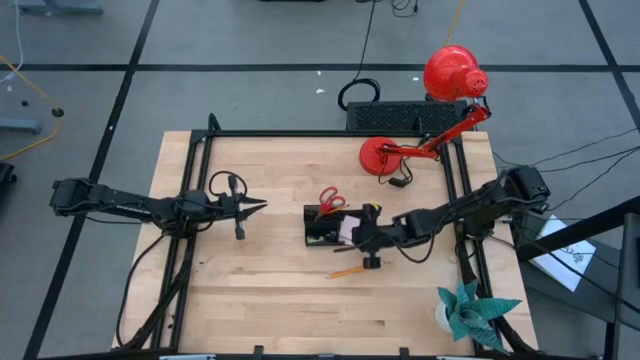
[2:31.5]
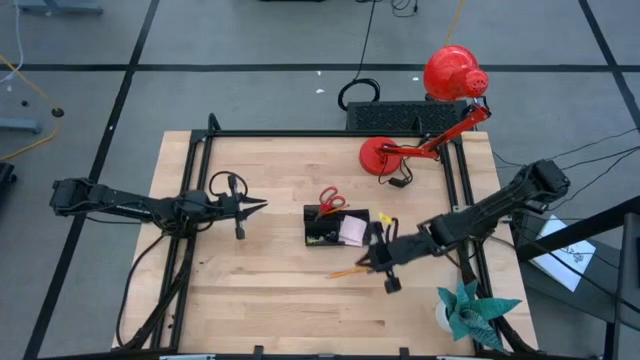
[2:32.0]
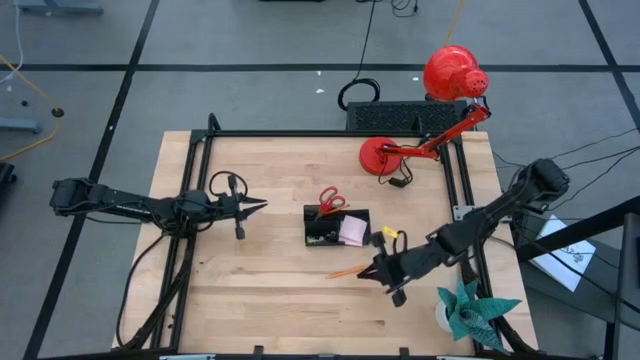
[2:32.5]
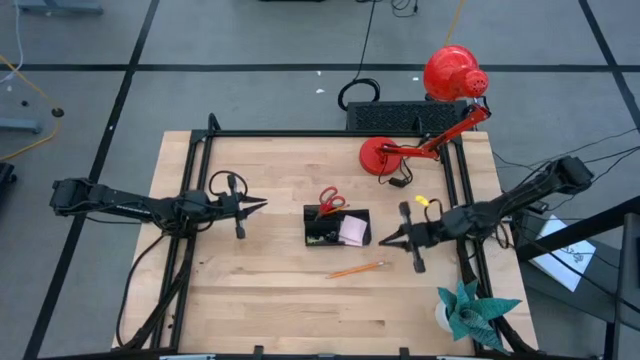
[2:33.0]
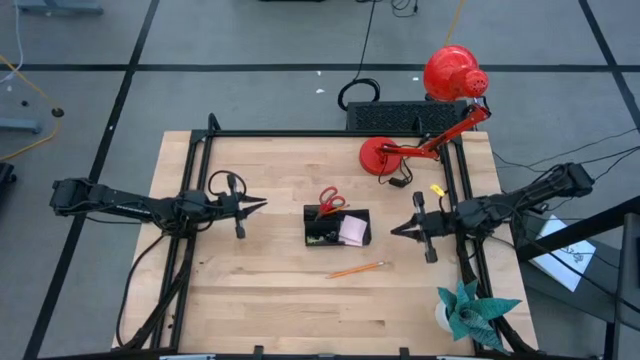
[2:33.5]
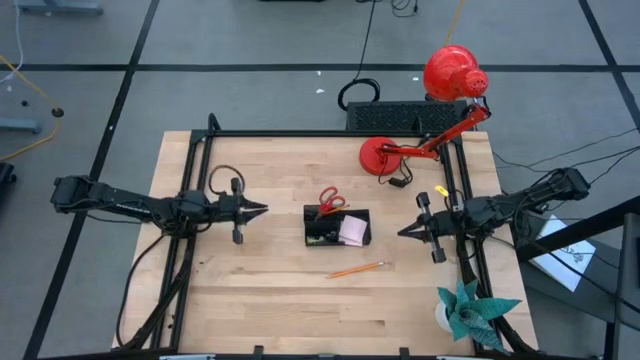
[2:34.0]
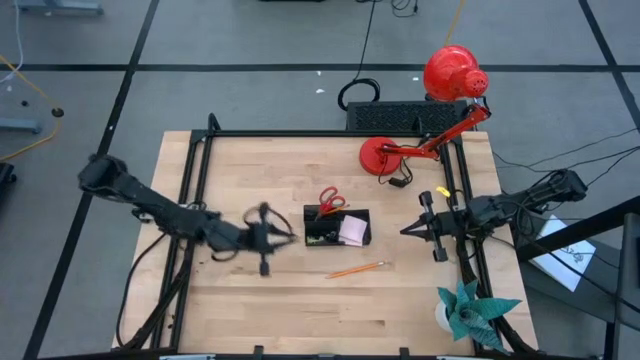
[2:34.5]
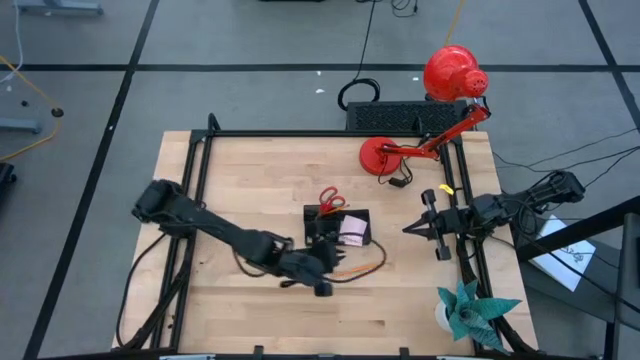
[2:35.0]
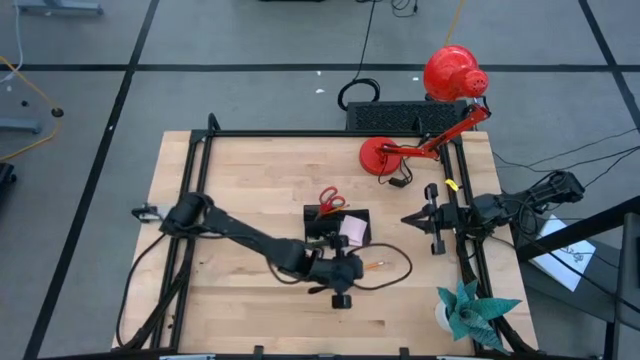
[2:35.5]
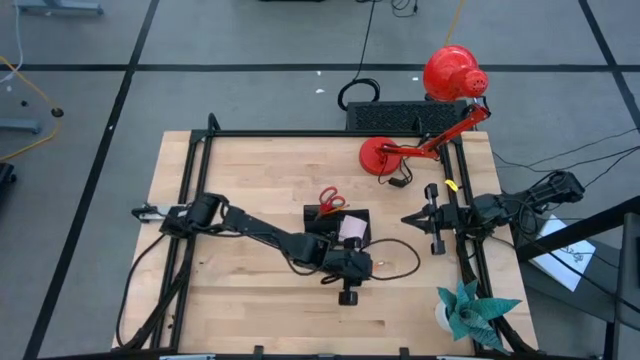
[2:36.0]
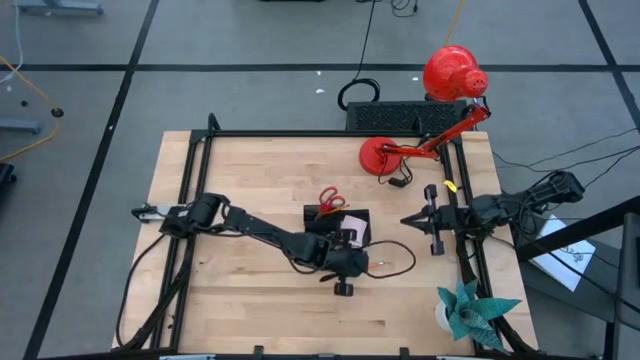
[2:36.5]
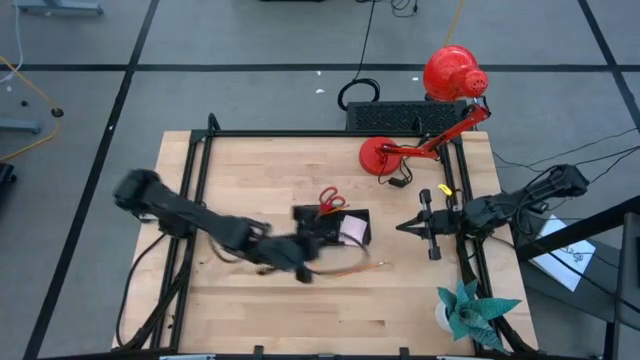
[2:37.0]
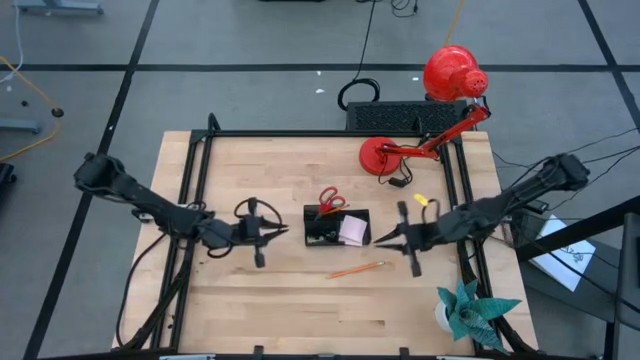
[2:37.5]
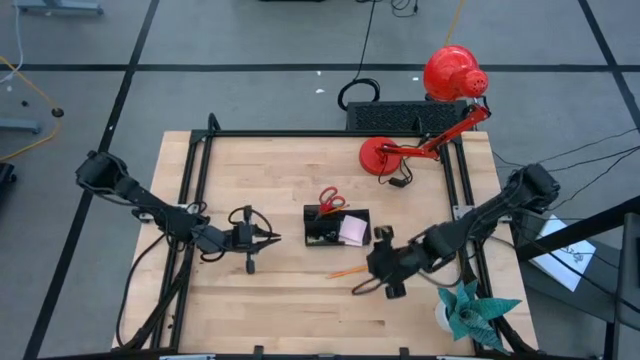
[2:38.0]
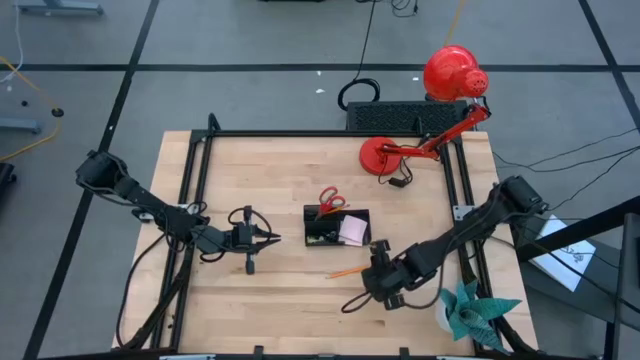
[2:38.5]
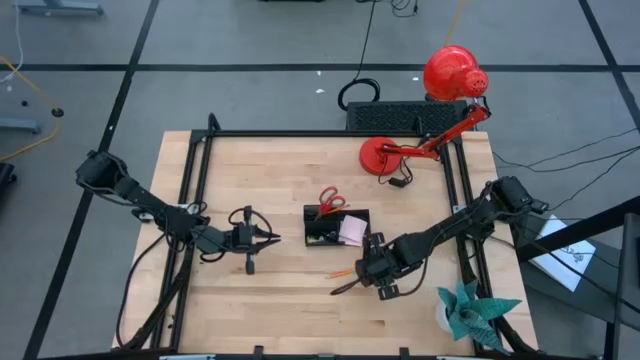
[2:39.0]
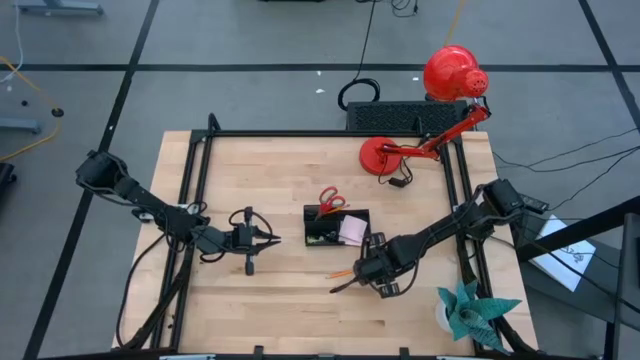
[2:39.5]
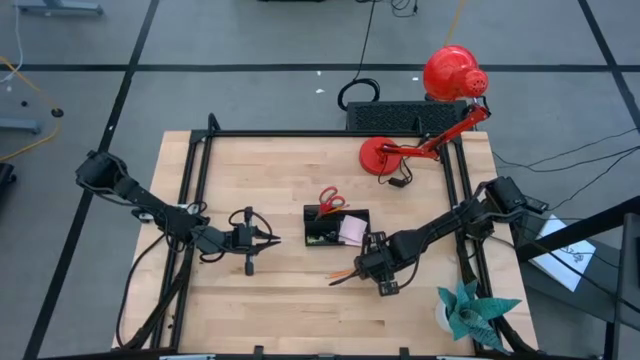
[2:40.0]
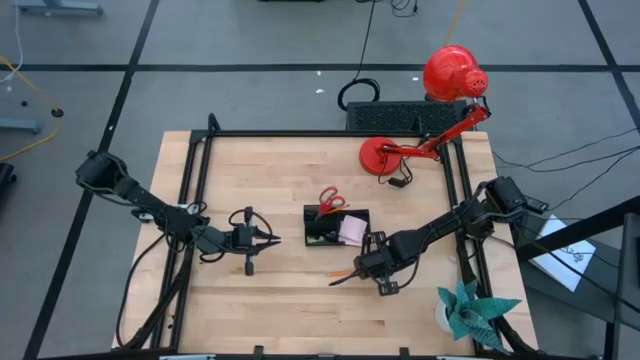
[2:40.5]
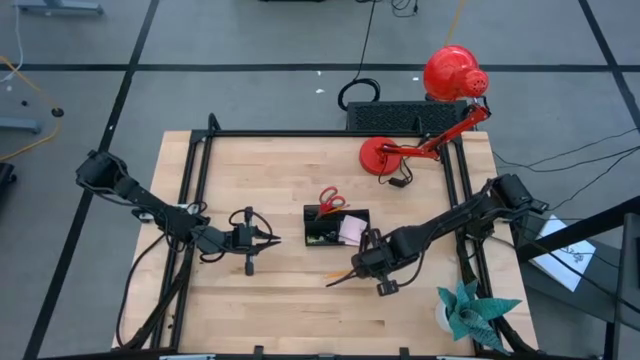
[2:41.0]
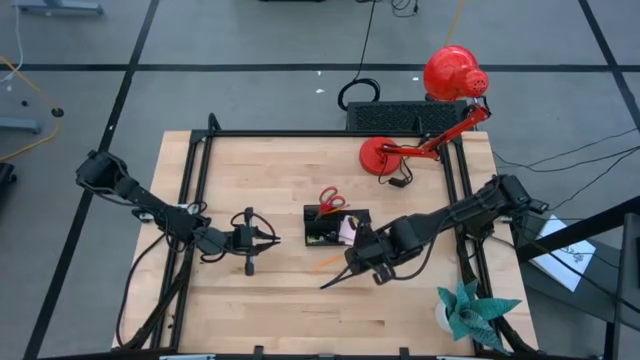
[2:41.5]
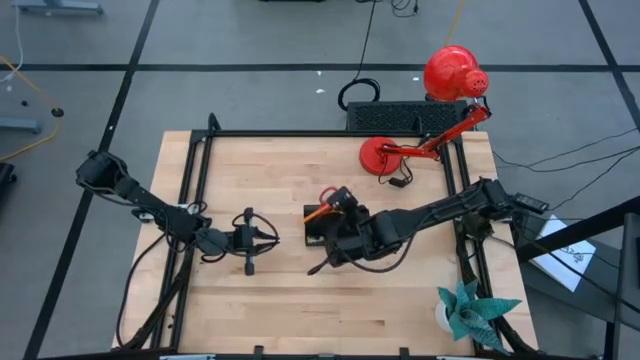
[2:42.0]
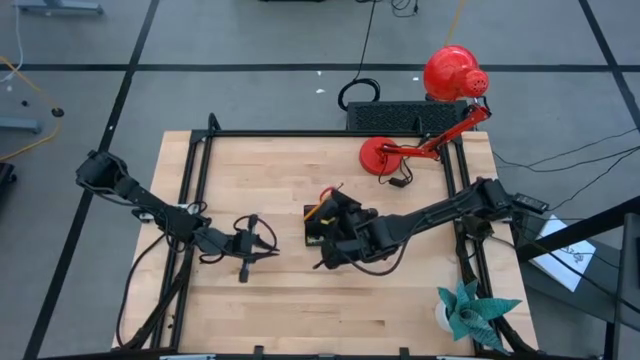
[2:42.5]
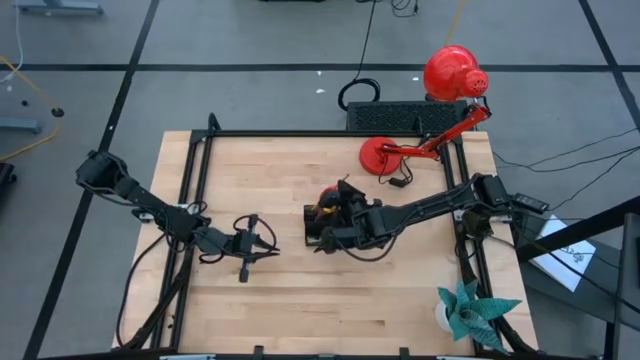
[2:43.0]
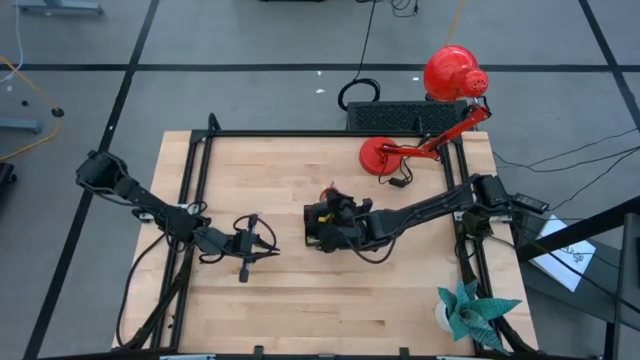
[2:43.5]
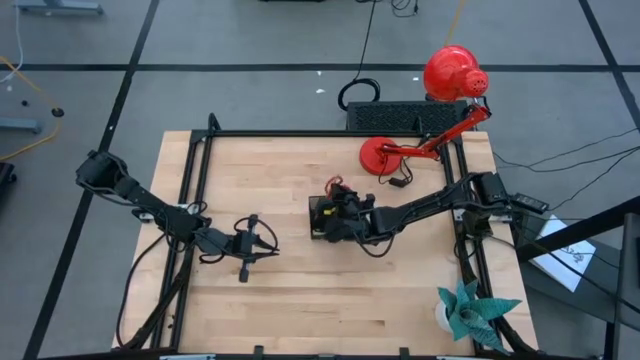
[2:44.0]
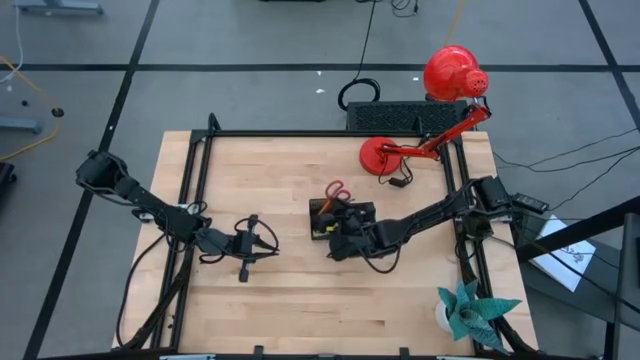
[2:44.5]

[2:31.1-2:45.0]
Task: Pick and place office supplies into organizer
Put the pencil into the desk organizer

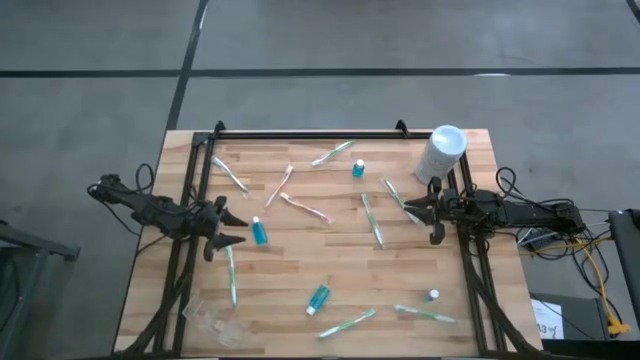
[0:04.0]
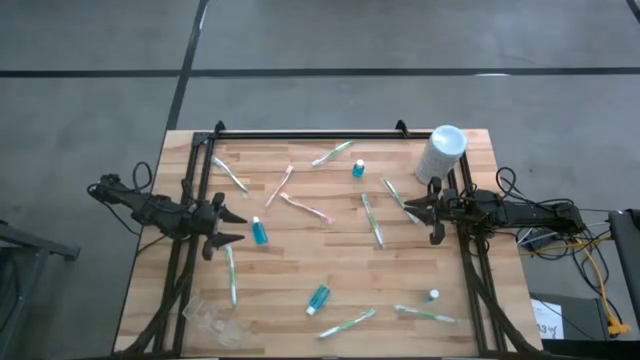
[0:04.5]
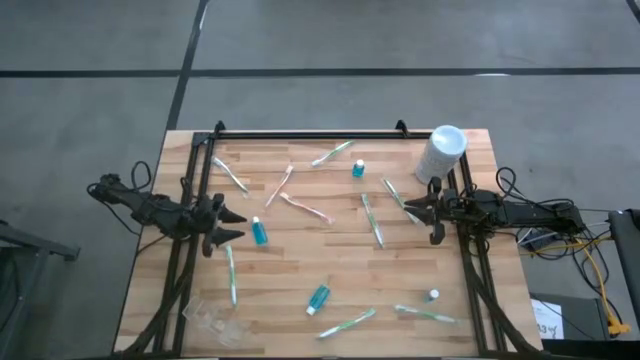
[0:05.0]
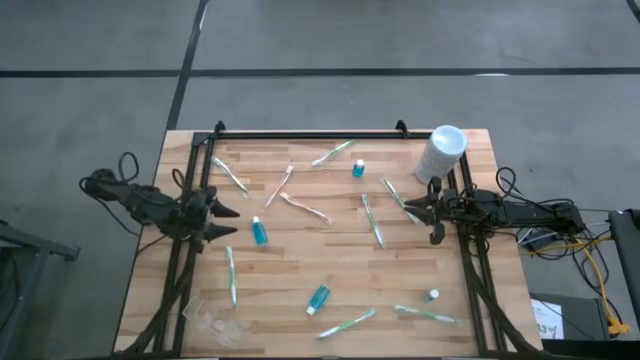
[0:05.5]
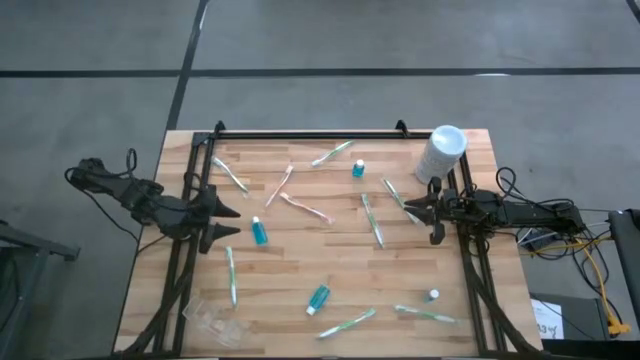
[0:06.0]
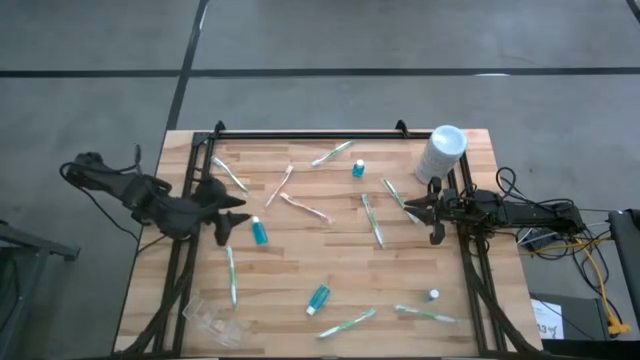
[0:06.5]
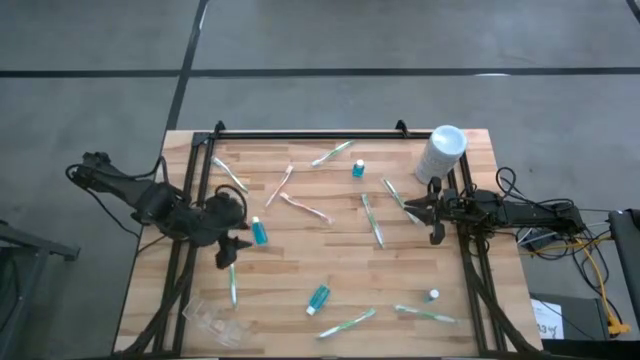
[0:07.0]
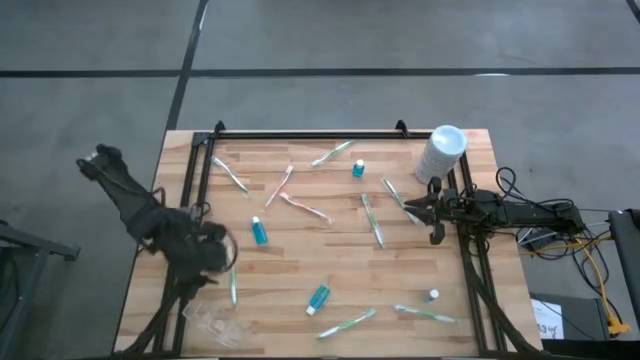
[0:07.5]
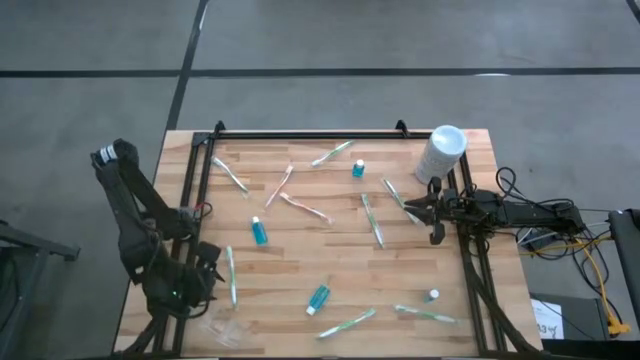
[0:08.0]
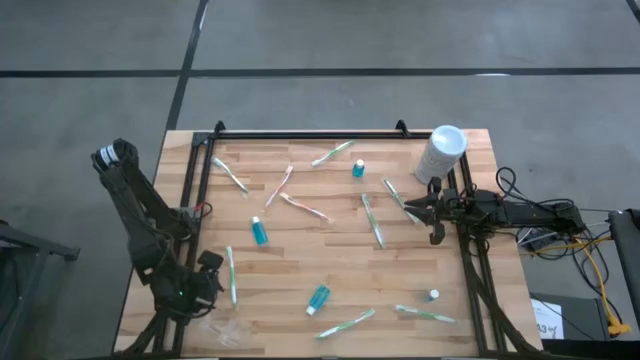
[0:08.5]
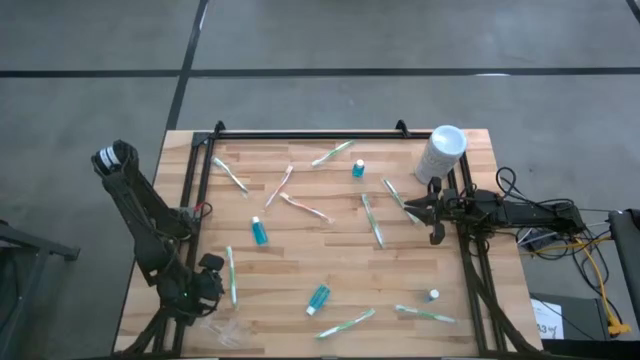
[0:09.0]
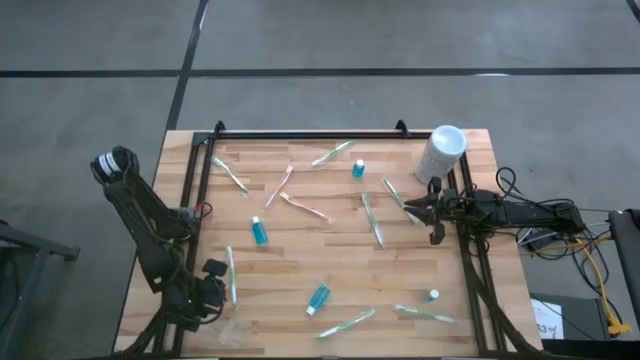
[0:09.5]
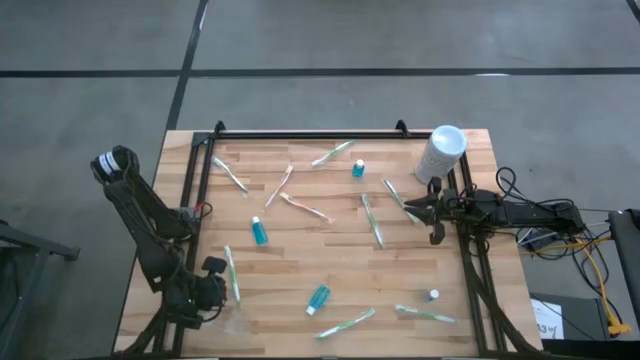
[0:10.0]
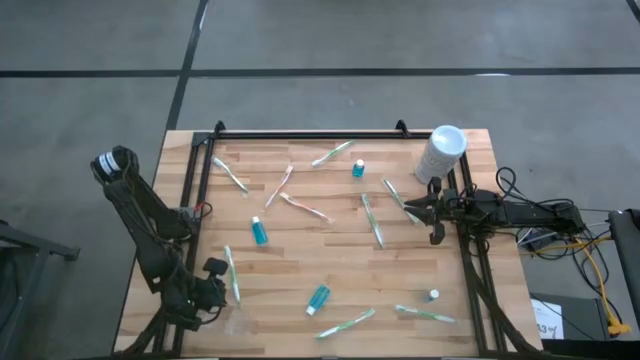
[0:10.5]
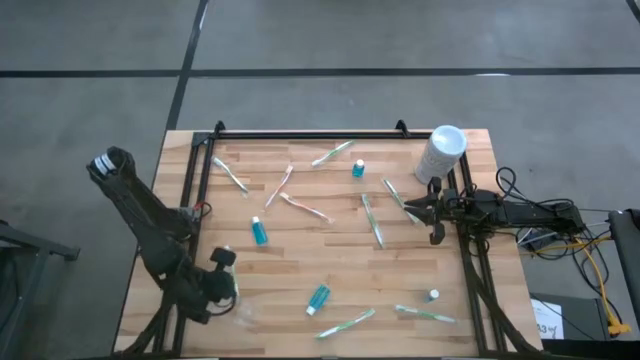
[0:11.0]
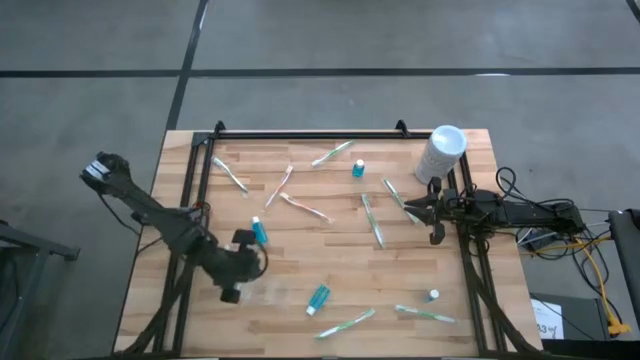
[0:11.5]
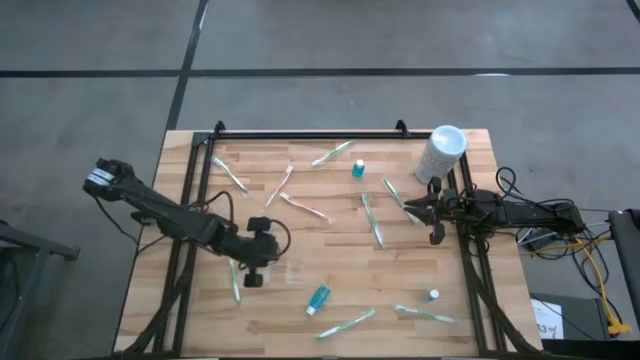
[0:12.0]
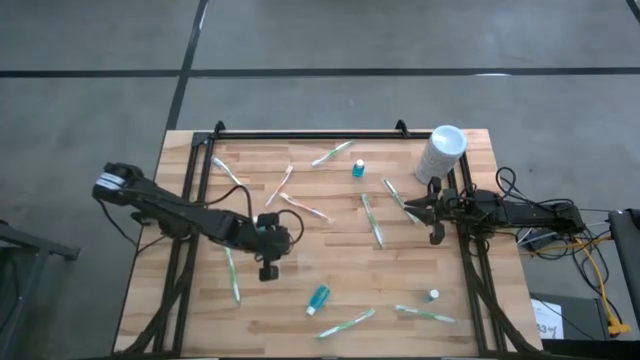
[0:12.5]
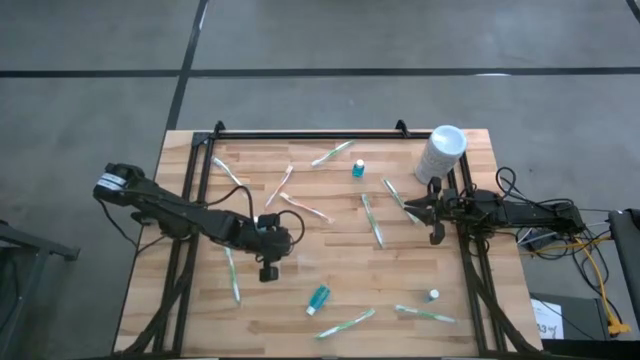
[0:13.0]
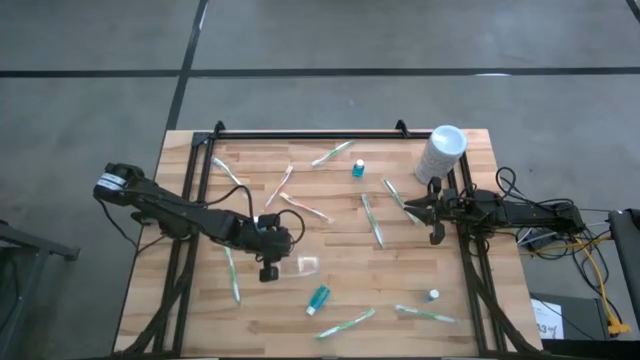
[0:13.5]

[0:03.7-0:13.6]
Task: Pick & Place toothbrushing station
Move the transparent organizer to the center of the table
